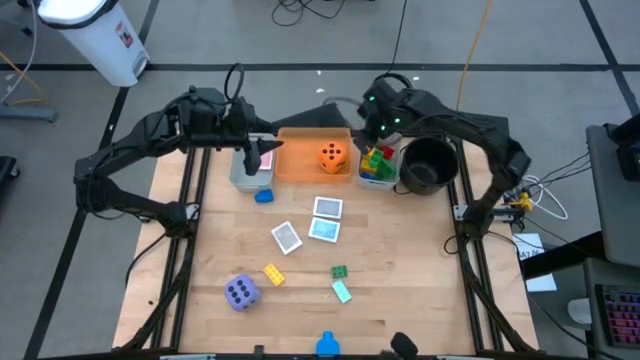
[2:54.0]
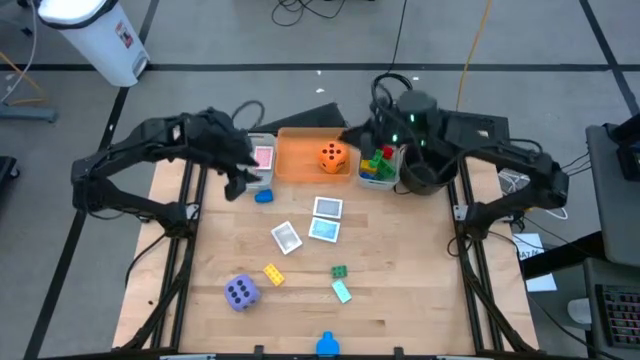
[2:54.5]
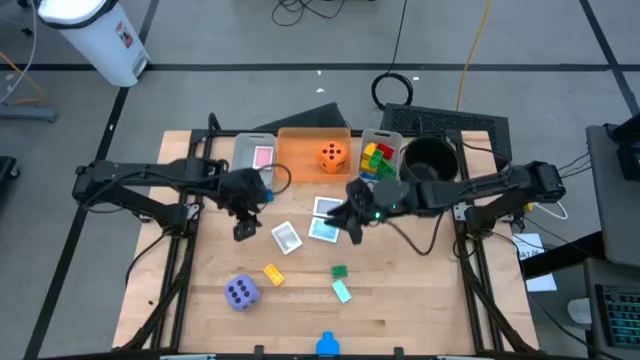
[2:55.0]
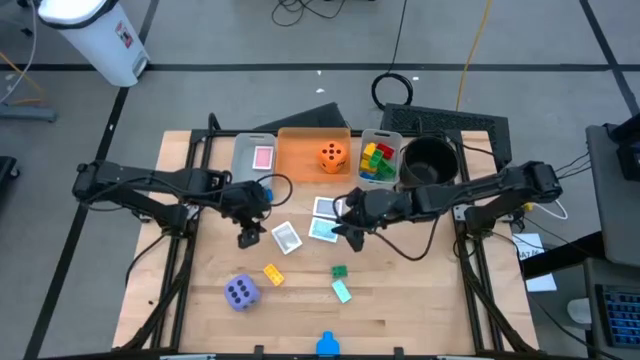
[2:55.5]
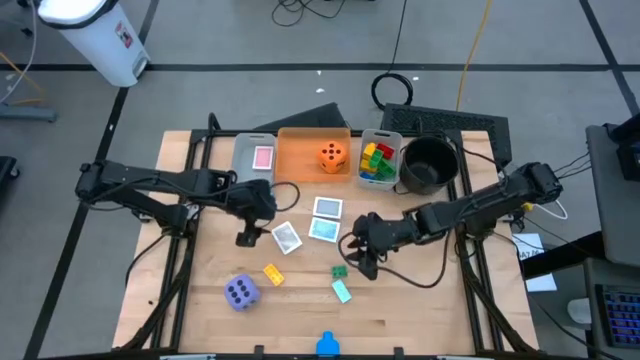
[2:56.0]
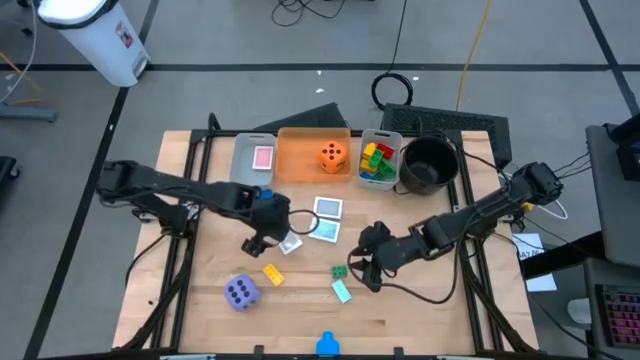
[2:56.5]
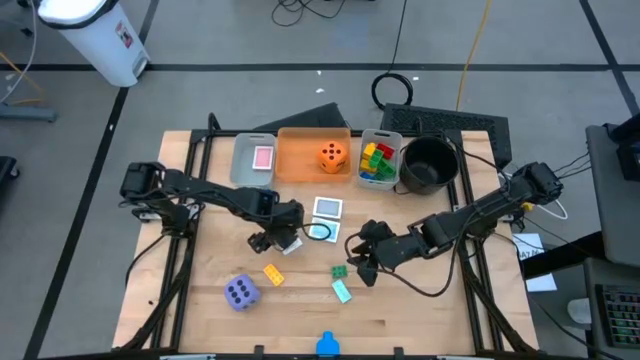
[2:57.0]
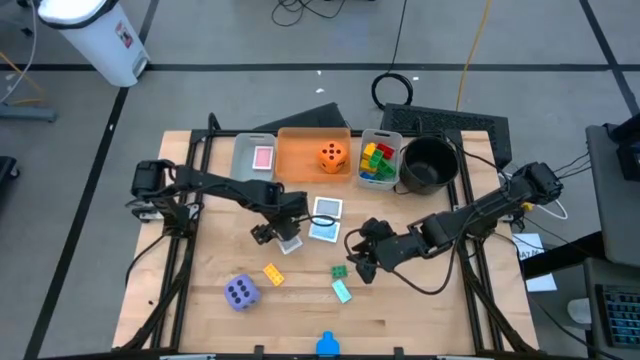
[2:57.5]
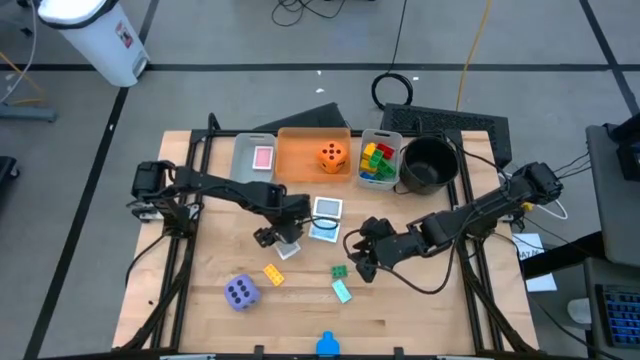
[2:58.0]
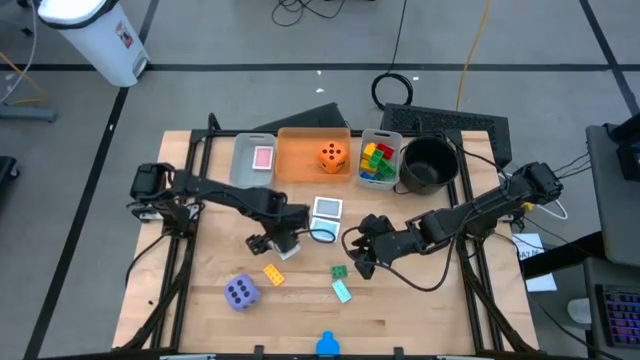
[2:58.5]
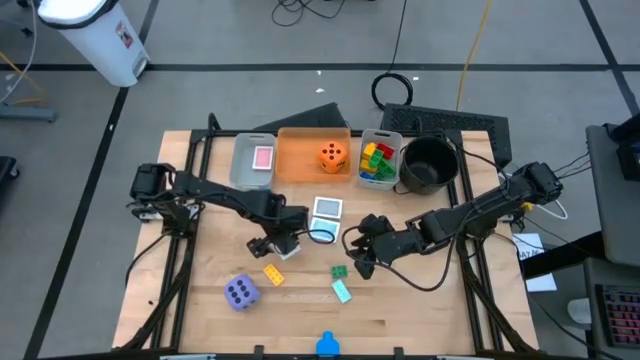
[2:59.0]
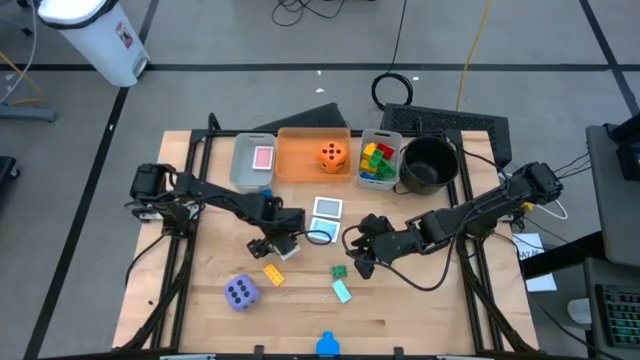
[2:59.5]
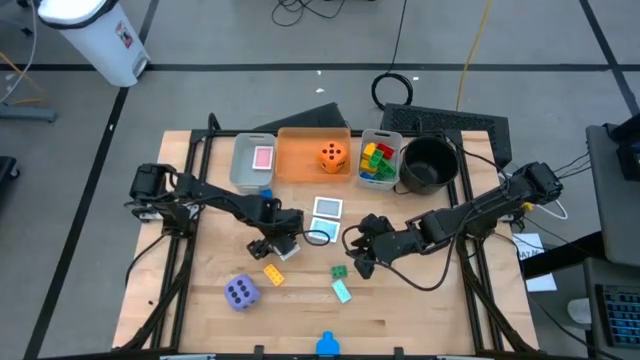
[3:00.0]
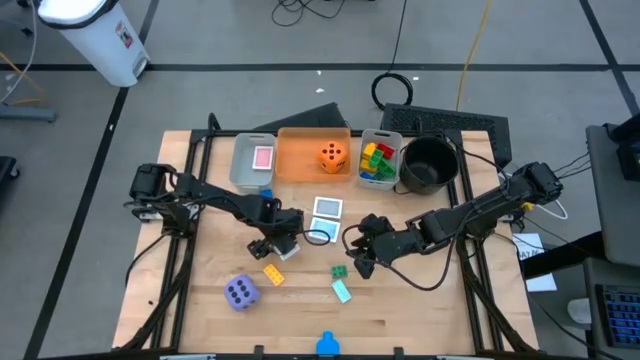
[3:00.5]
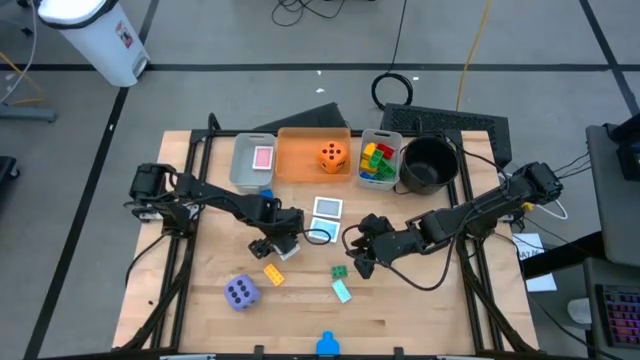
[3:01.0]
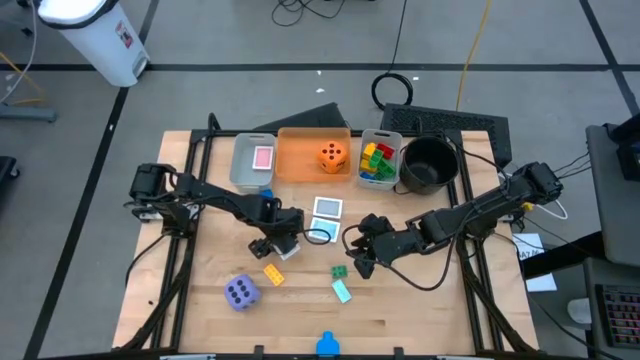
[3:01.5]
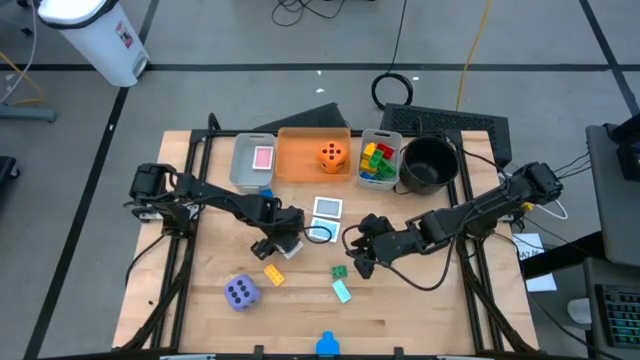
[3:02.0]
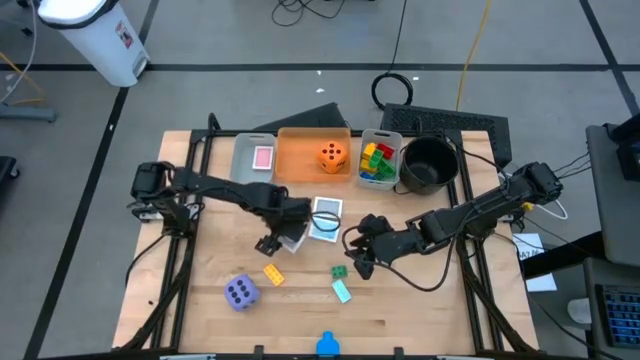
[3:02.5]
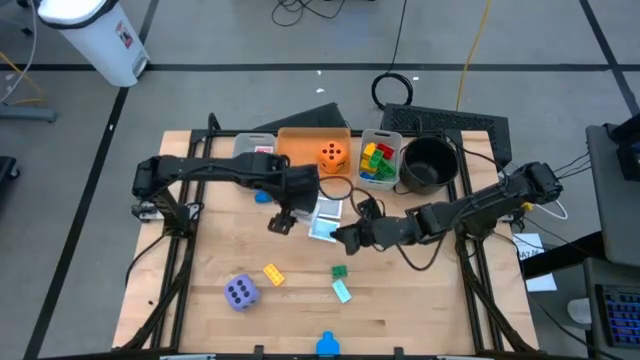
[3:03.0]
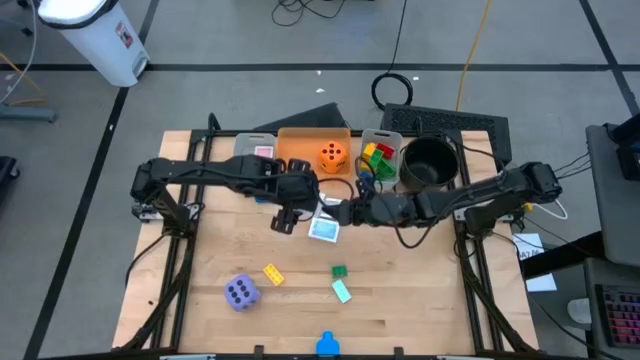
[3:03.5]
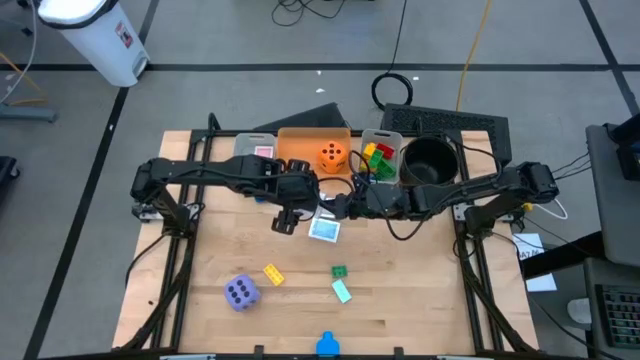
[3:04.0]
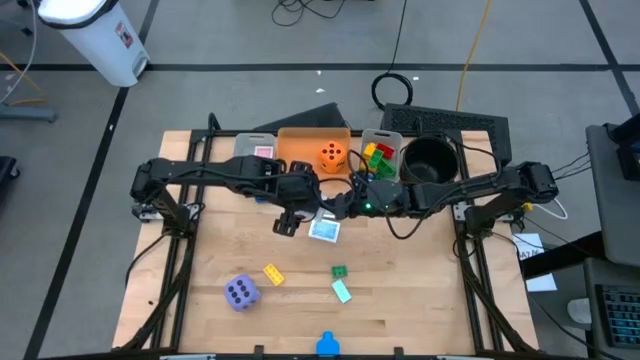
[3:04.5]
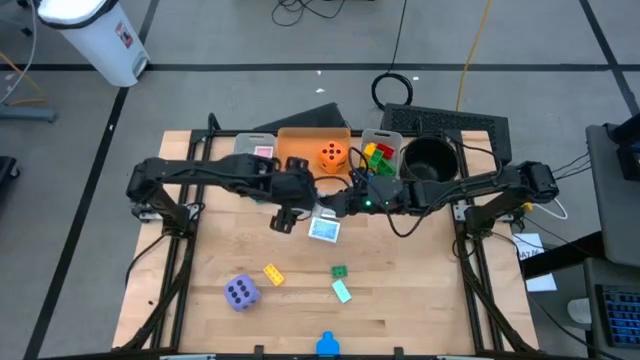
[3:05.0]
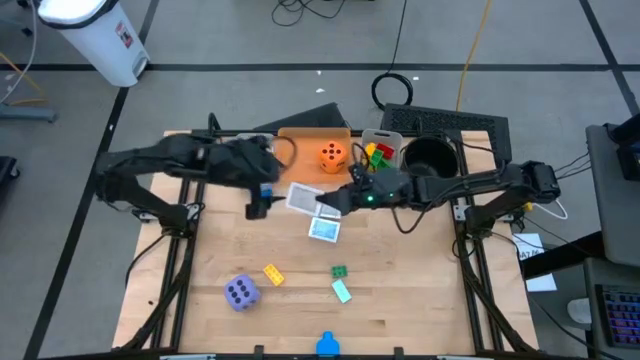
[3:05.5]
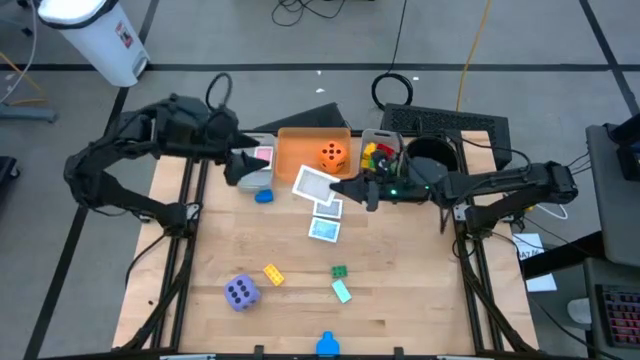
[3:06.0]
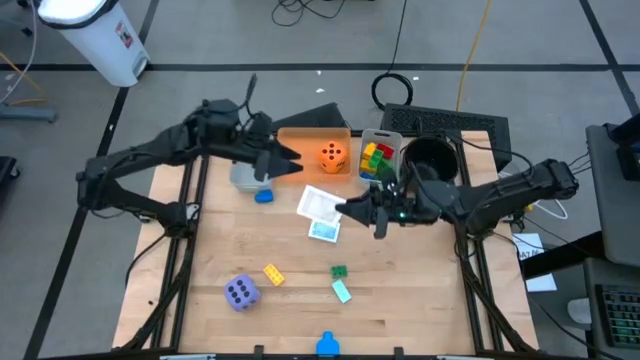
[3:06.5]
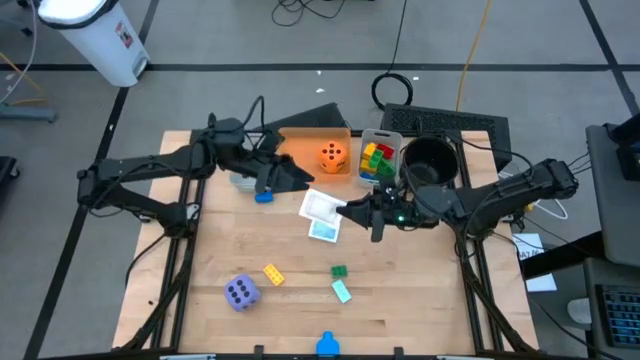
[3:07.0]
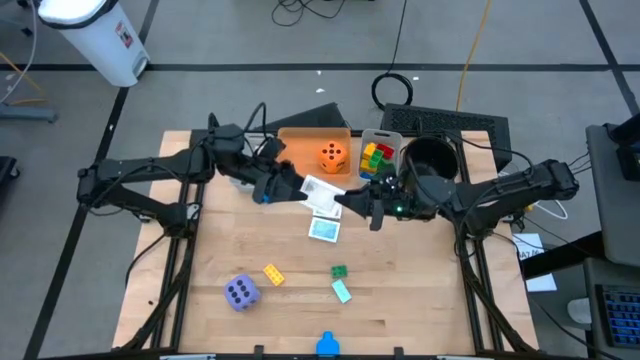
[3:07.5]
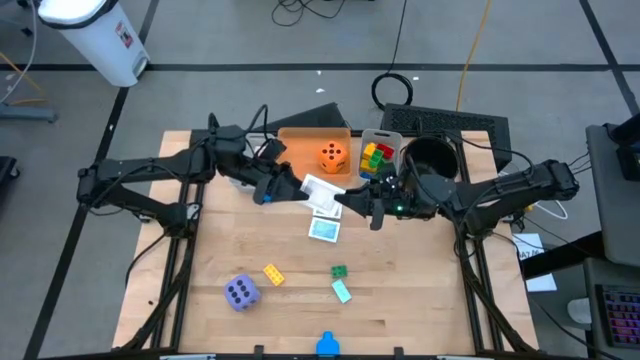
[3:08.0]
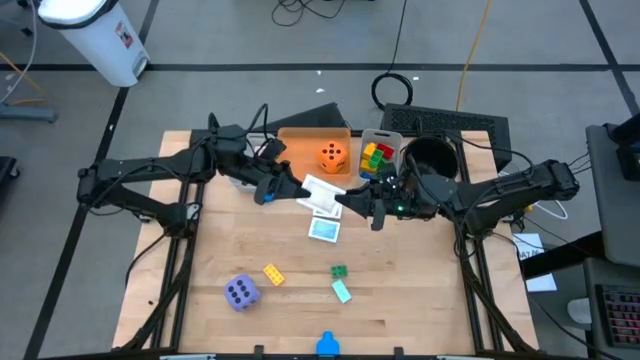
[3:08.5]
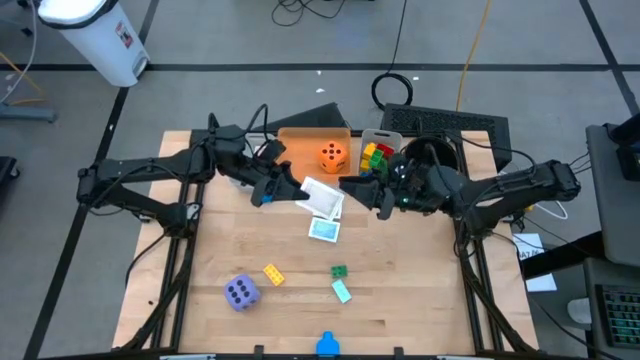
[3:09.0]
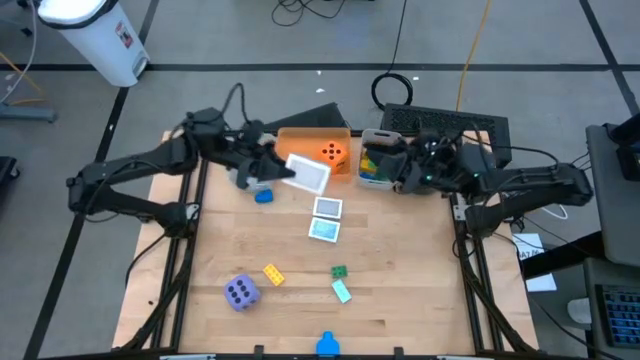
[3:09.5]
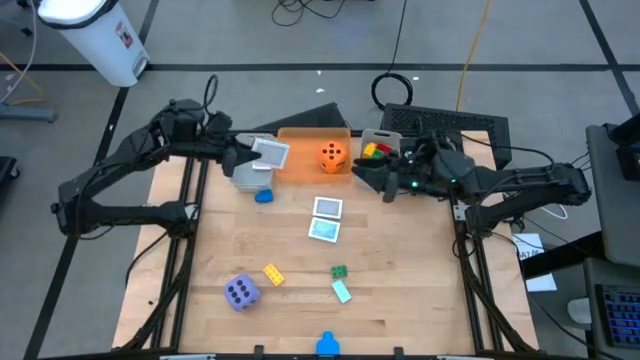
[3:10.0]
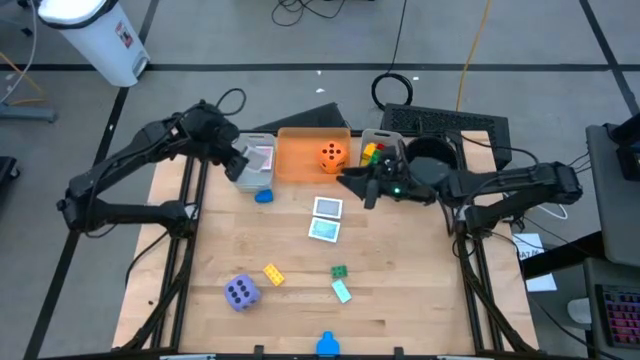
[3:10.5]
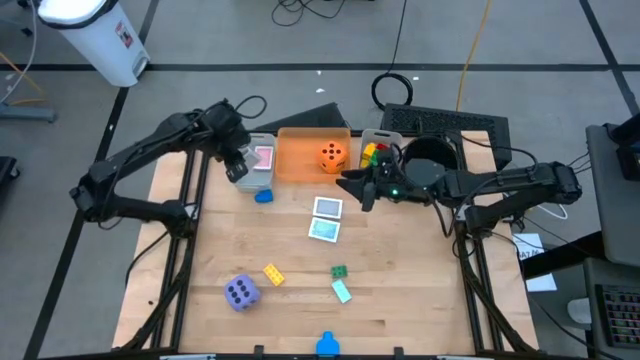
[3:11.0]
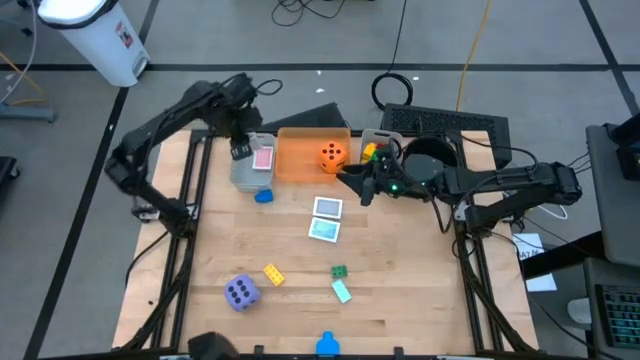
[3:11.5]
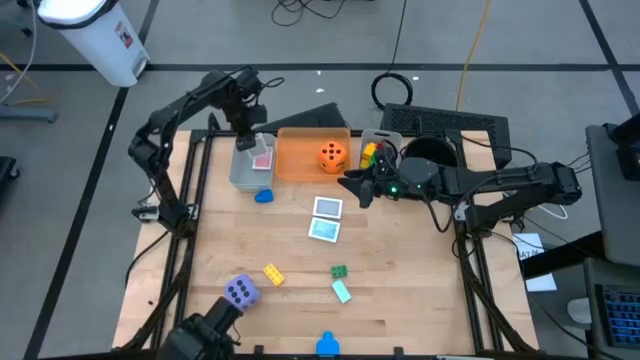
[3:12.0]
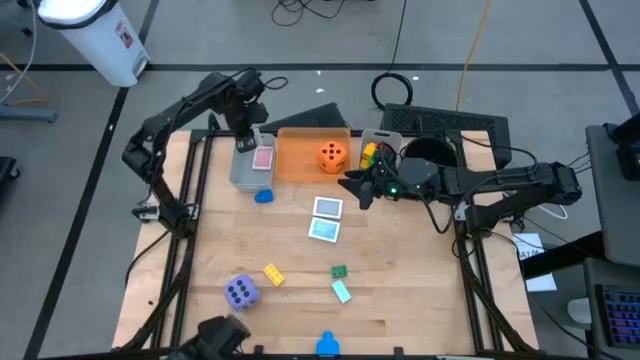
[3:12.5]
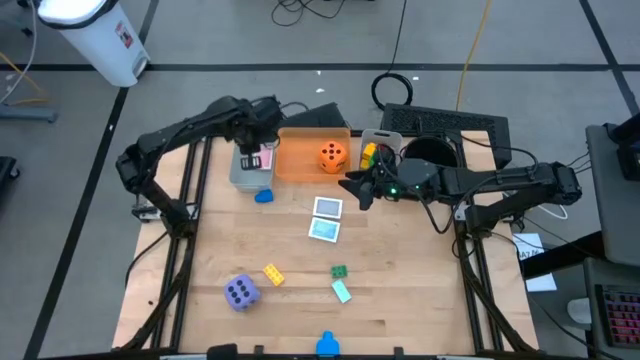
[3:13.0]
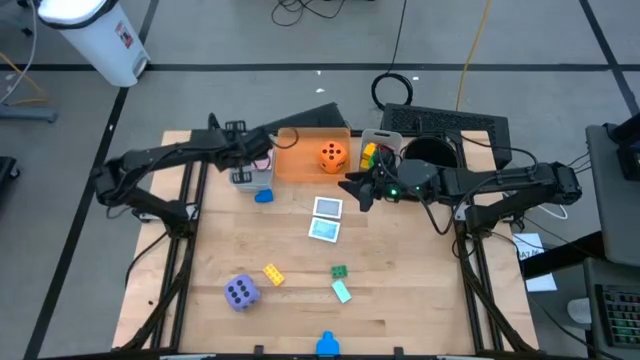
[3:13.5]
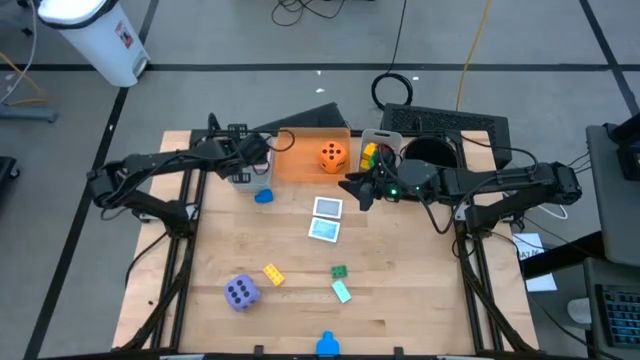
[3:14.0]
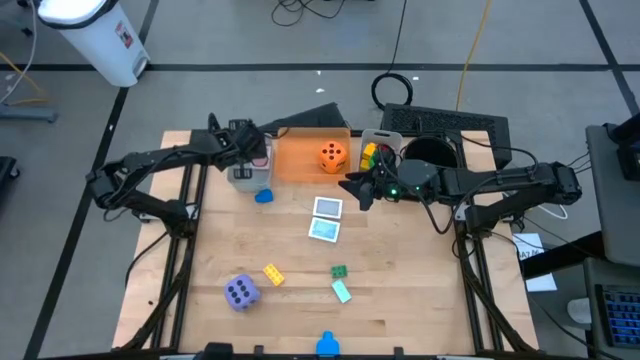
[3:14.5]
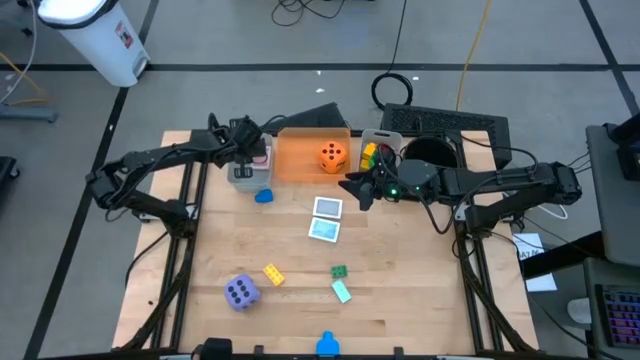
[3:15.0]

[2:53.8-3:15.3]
Task: Pick & Place Toys
Put the brown deck of cards into the left gray bin
